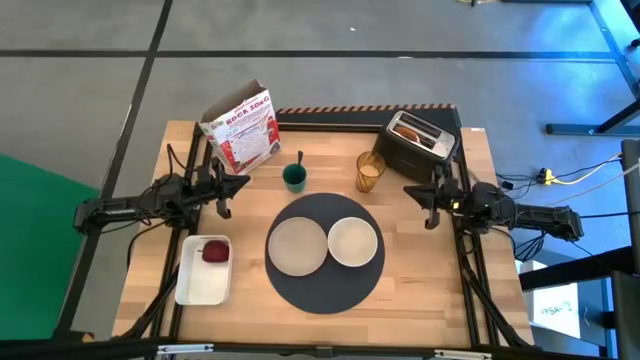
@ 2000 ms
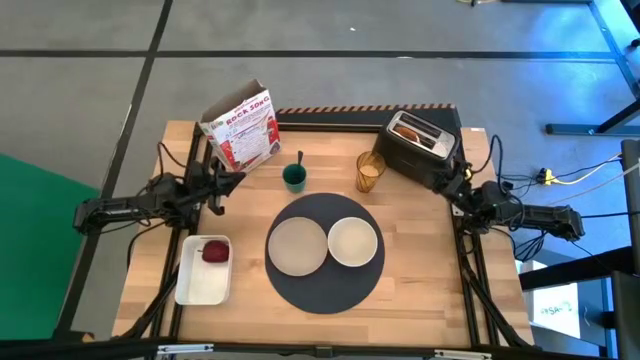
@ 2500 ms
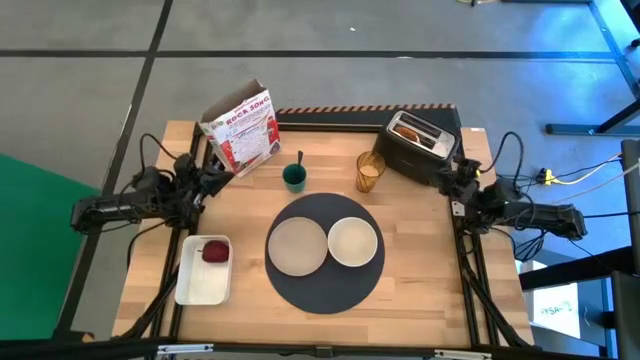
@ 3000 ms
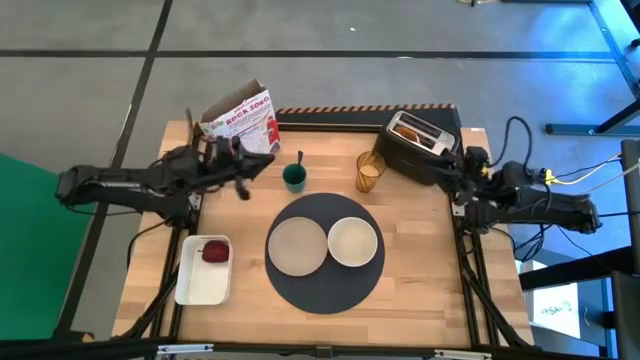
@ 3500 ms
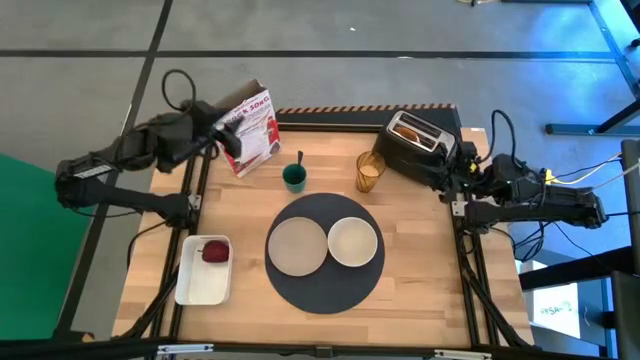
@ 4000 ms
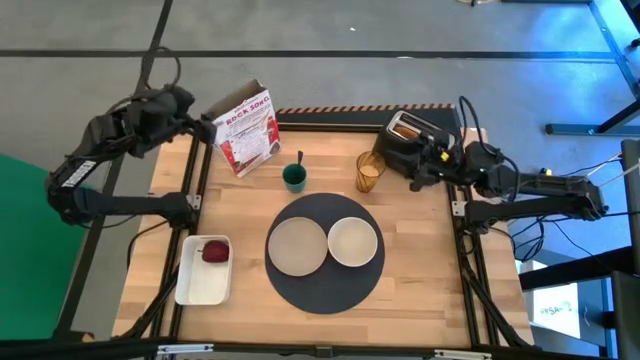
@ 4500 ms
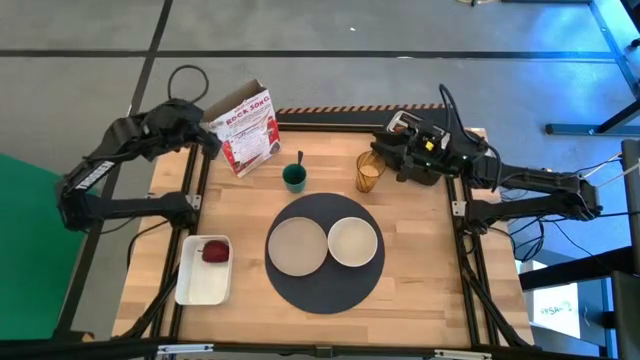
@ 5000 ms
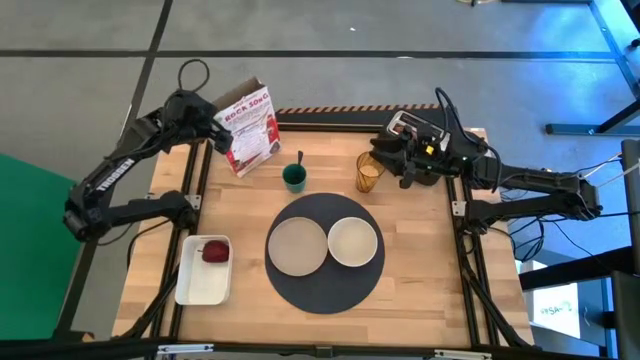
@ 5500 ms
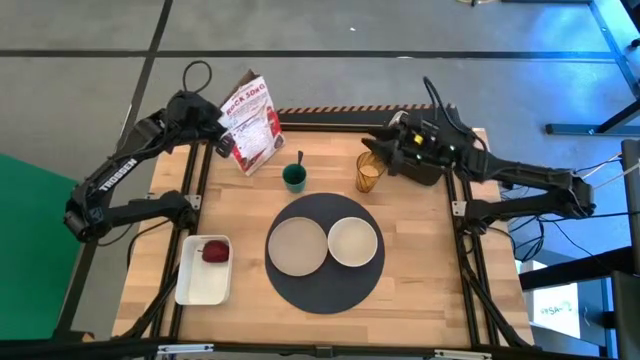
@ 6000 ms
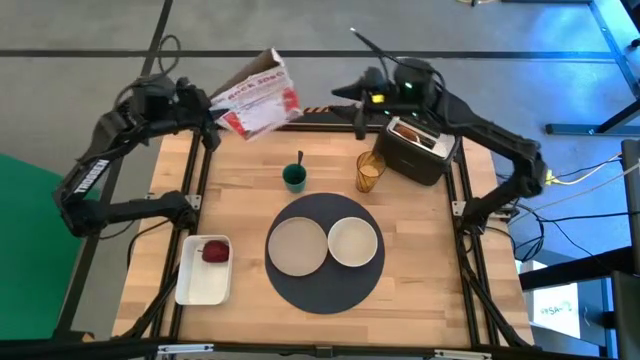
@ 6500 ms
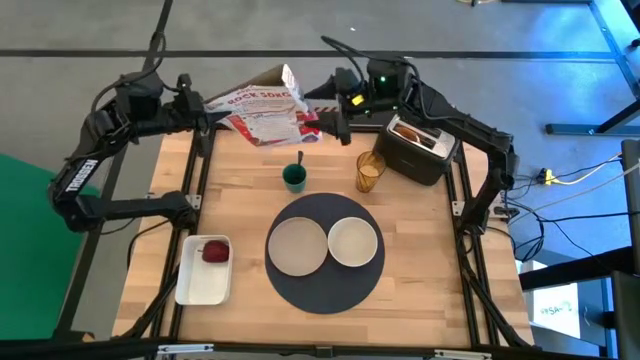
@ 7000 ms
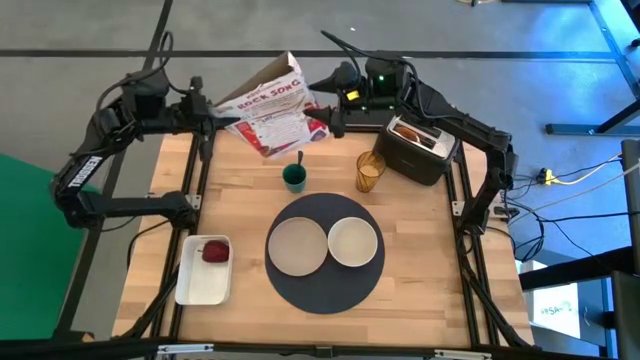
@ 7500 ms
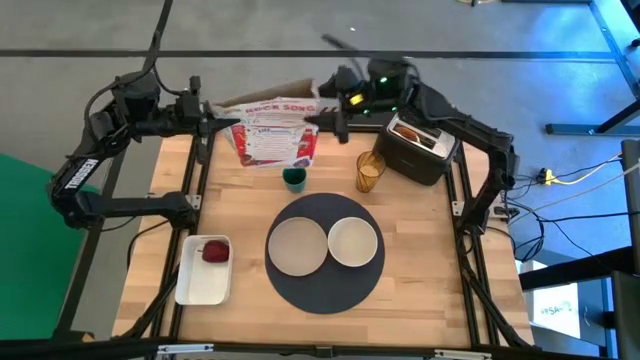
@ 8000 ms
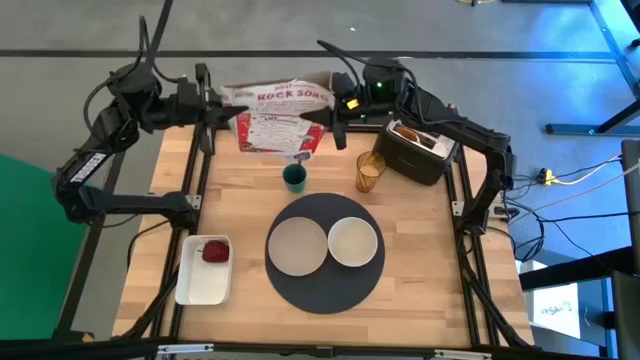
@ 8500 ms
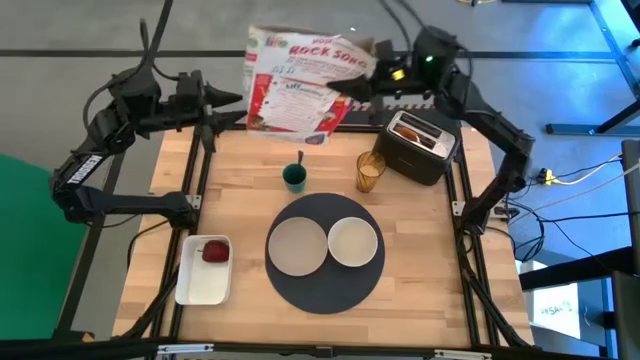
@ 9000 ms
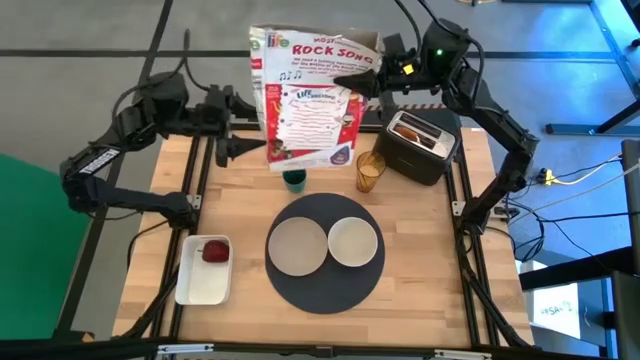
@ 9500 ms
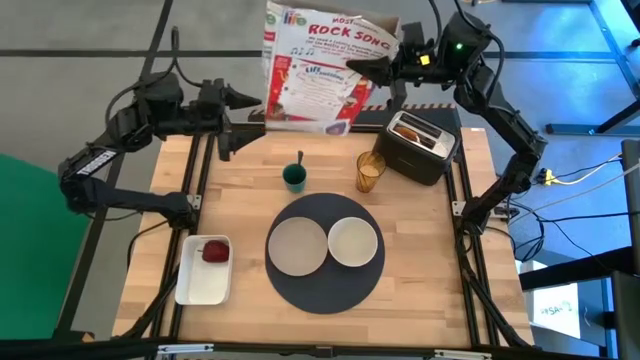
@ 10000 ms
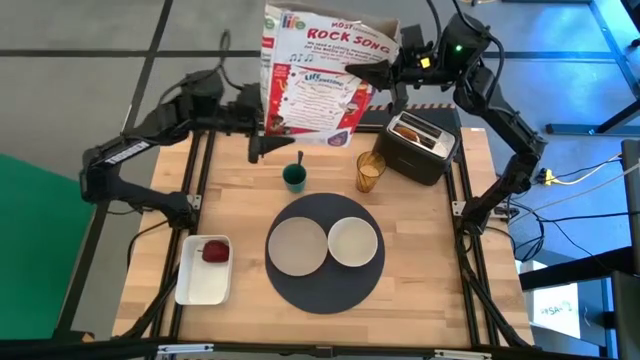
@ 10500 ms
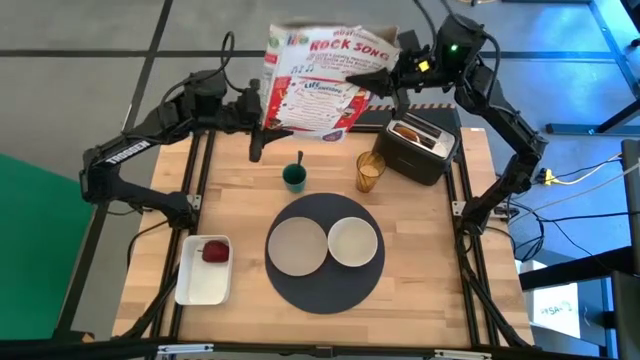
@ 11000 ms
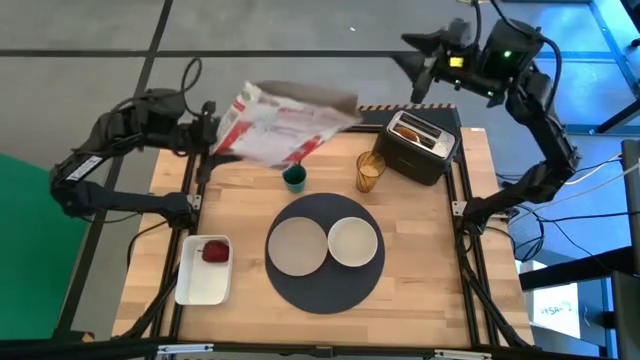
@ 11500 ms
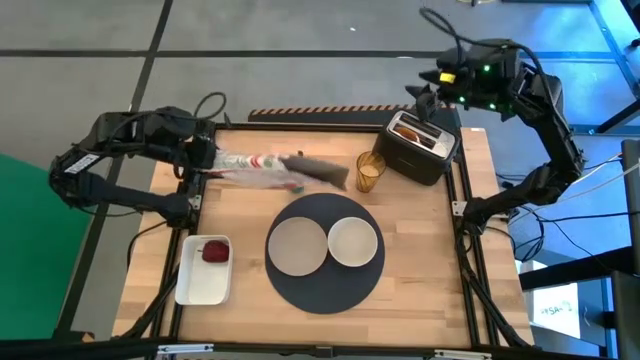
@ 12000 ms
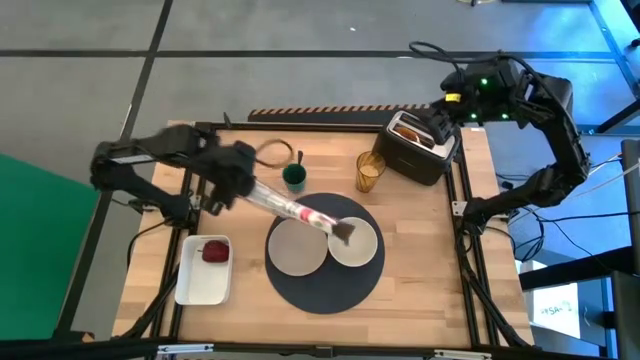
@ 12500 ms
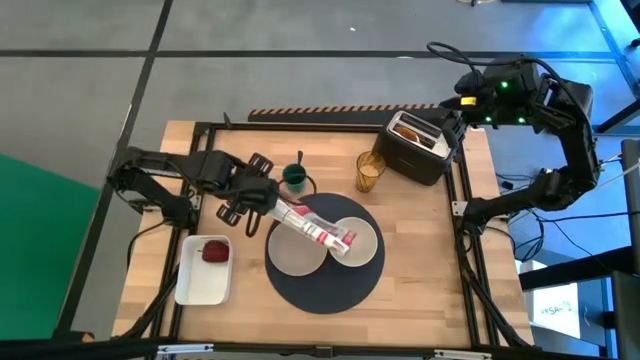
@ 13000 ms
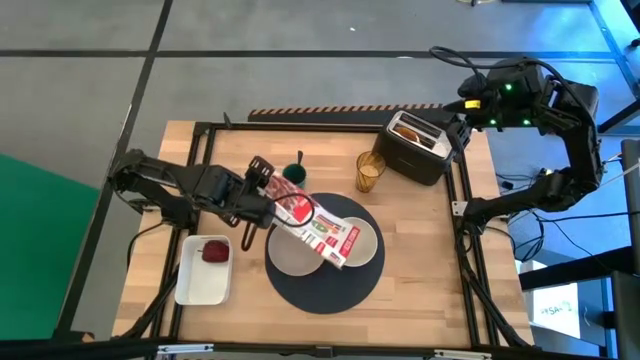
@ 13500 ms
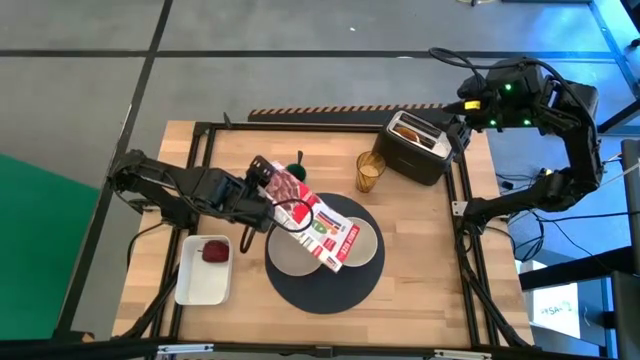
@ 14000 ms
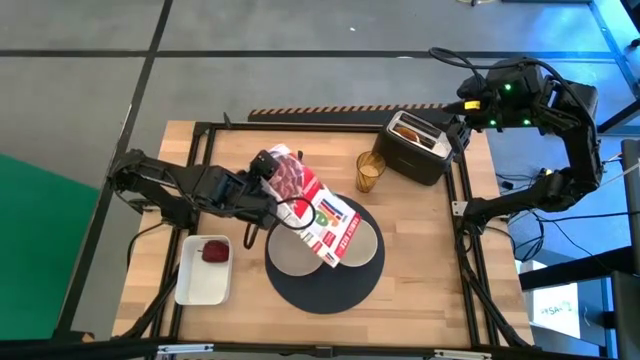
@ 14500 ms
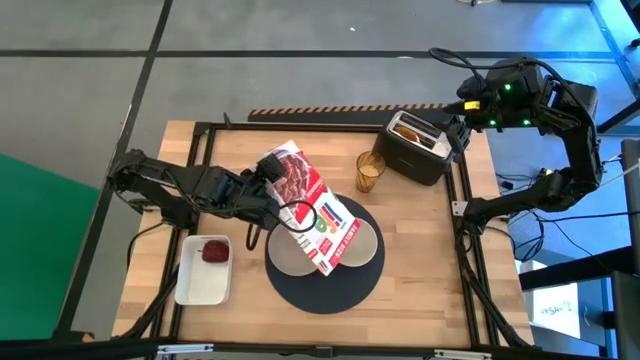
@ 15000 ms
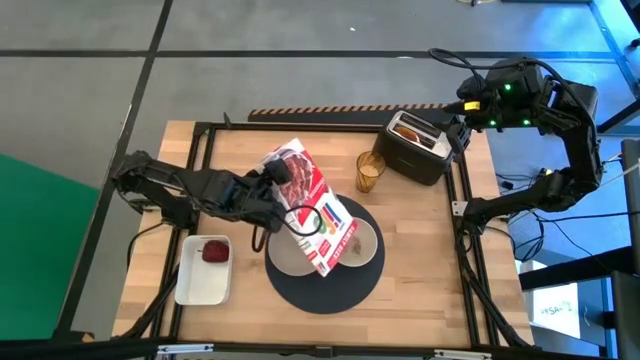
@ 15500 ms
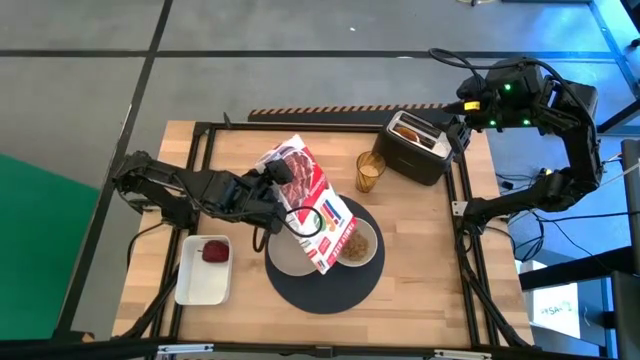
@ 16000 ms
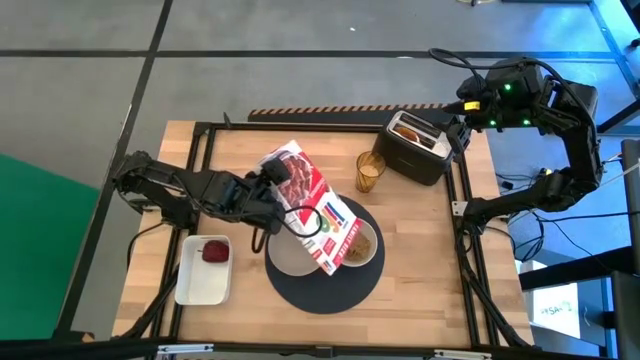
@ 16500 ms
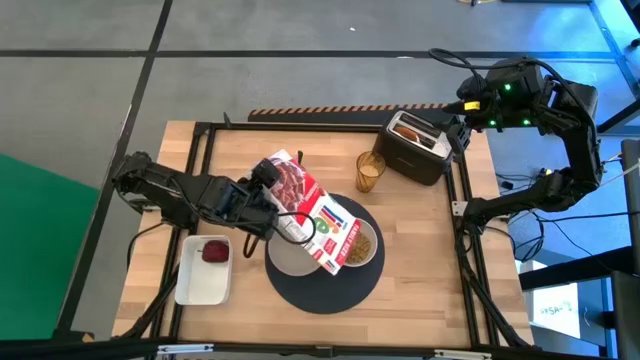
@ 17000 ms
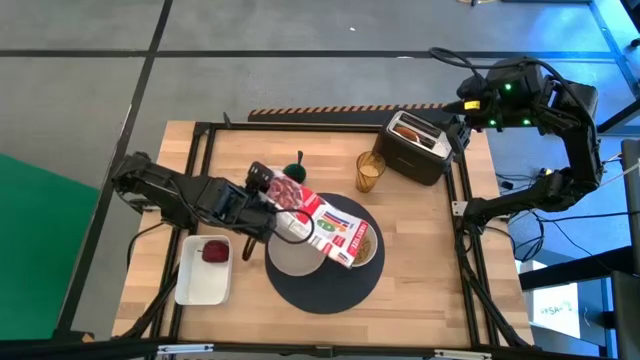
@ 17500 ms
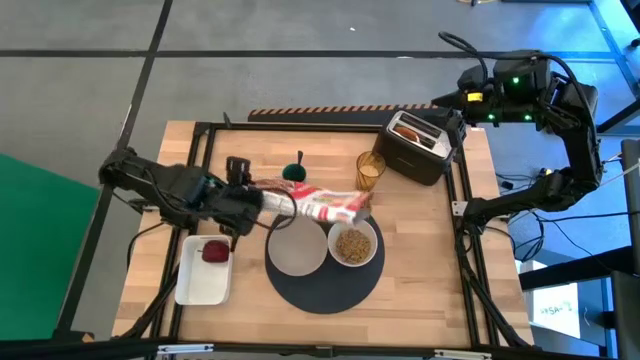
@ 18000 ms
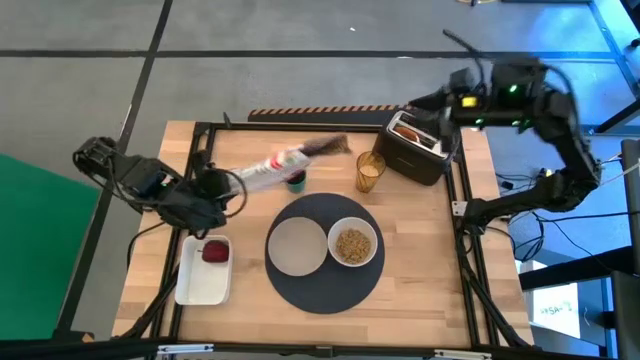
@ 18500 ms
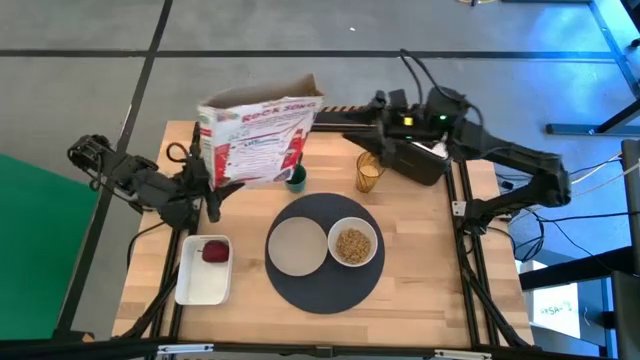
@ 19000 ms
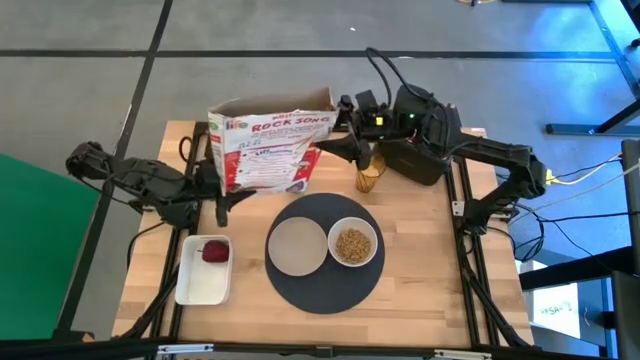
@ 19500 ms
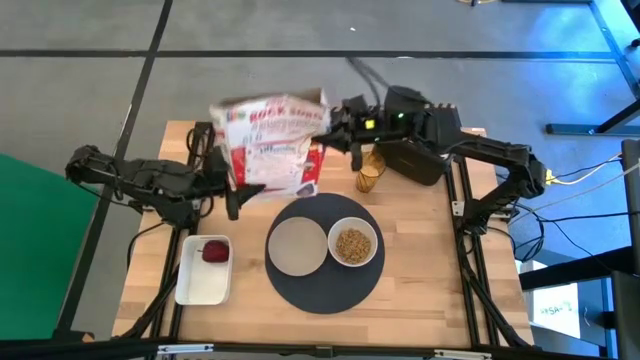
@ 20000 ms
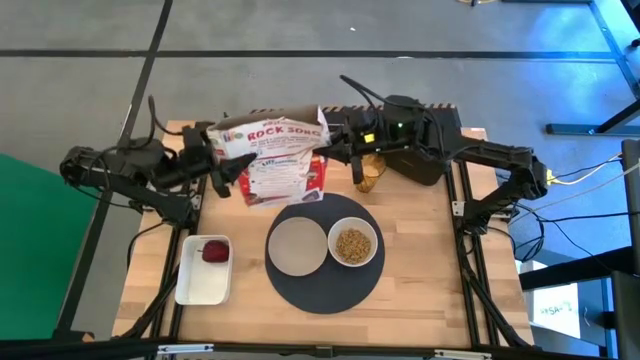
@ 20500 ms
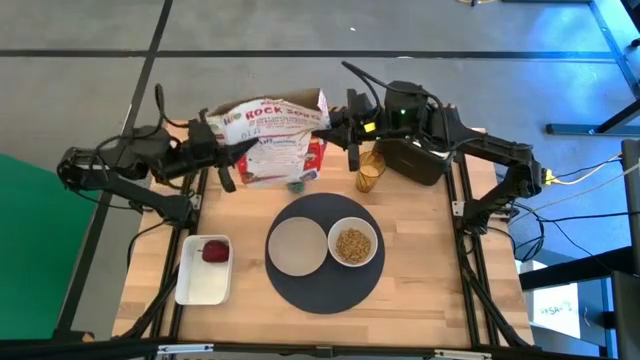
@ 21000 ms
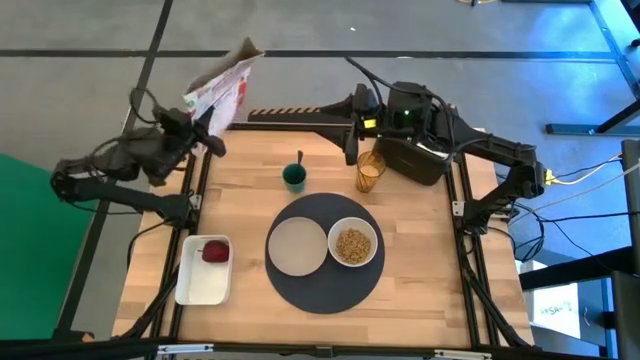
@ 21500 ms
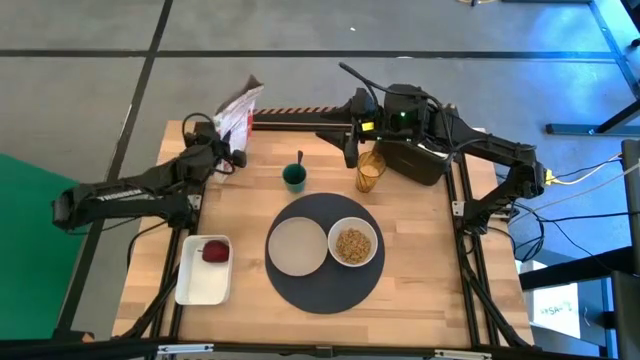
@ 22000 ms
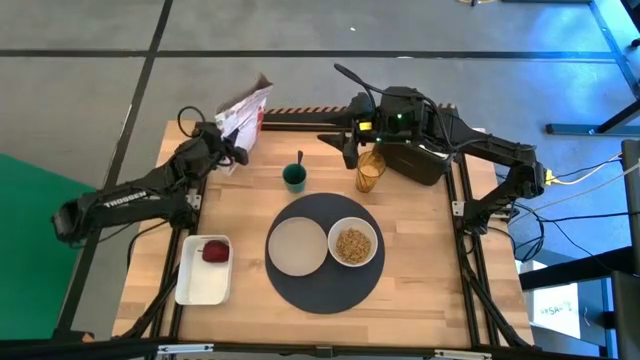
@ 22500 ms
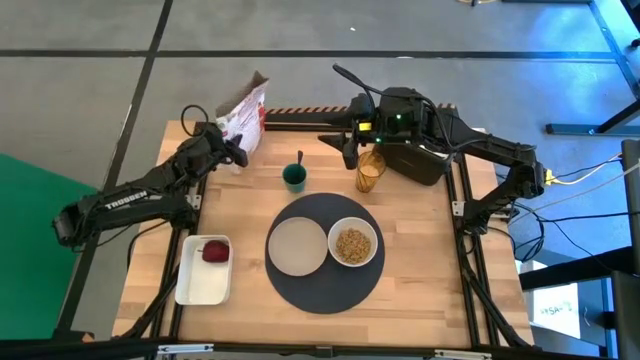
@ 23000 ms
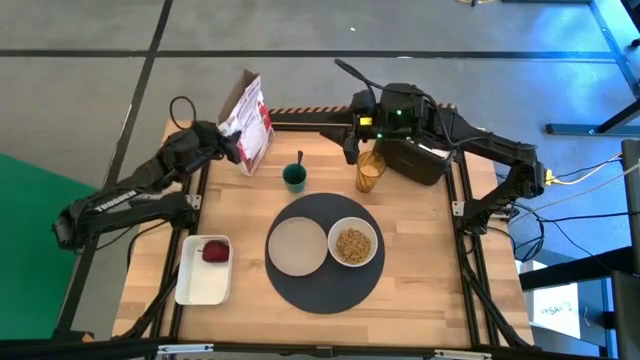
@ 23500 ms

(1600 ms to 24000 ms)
Task: Arrange a breakfast setting
Pour the cereal from the cereal box into the white bowl
